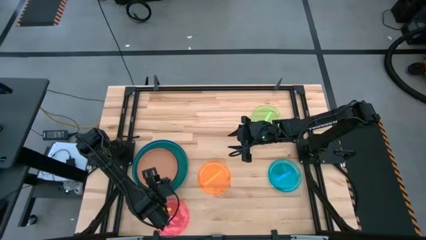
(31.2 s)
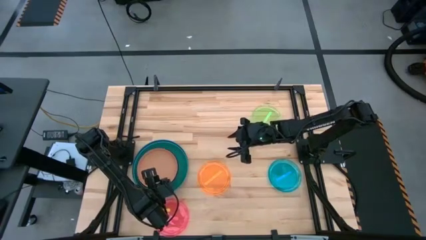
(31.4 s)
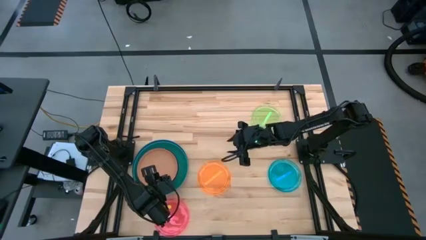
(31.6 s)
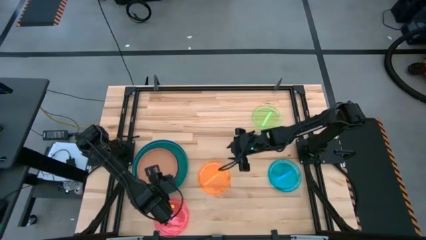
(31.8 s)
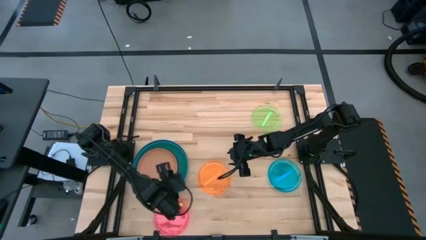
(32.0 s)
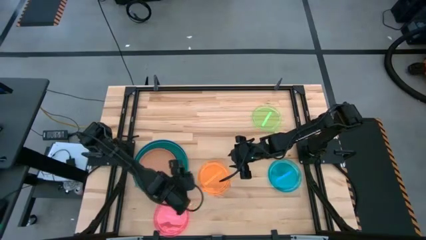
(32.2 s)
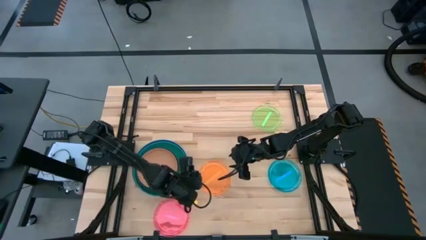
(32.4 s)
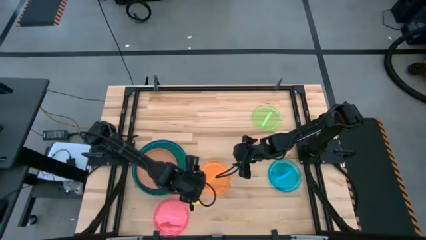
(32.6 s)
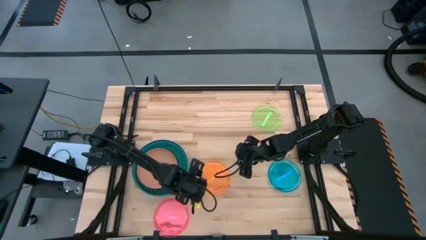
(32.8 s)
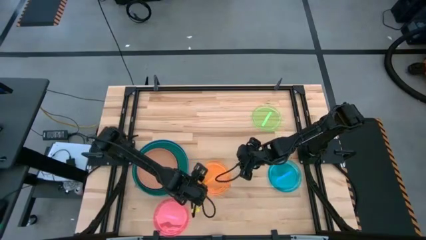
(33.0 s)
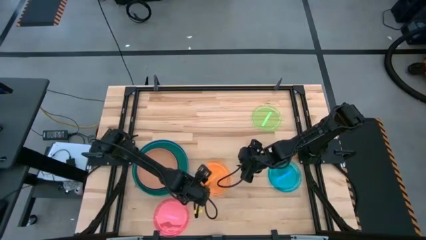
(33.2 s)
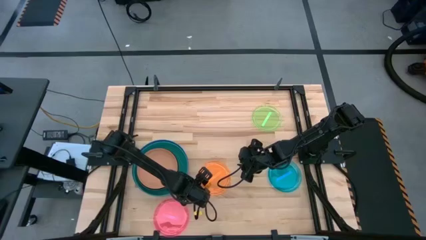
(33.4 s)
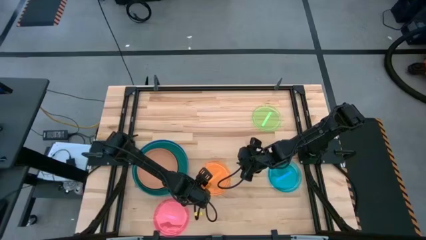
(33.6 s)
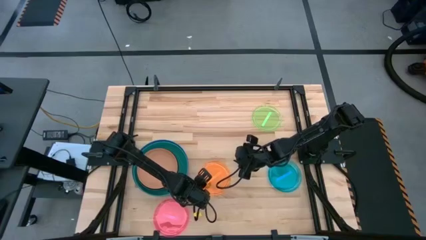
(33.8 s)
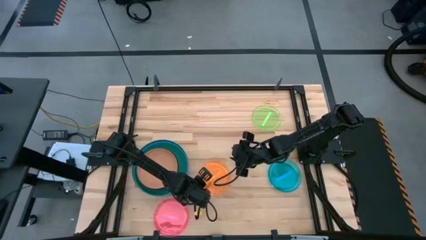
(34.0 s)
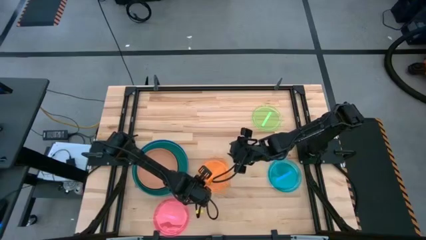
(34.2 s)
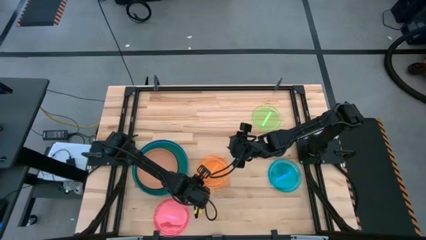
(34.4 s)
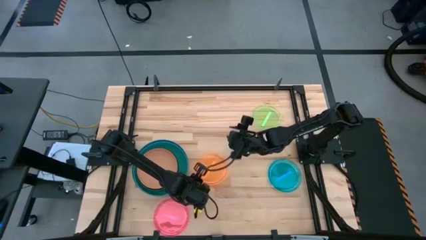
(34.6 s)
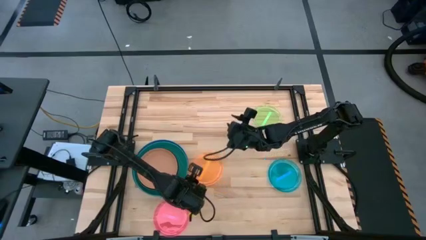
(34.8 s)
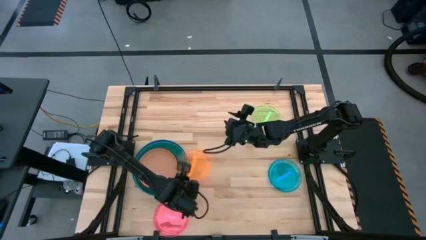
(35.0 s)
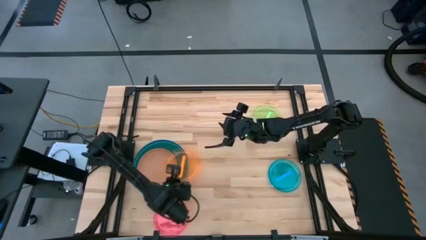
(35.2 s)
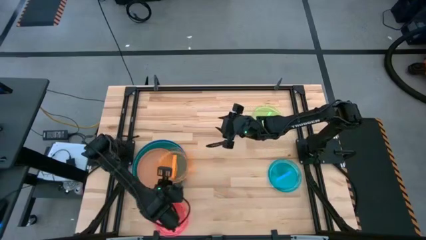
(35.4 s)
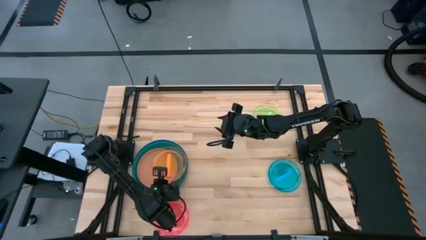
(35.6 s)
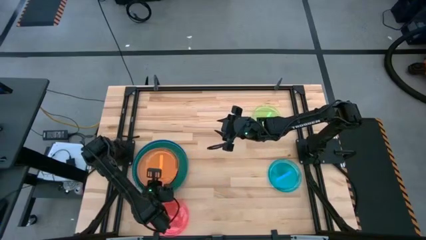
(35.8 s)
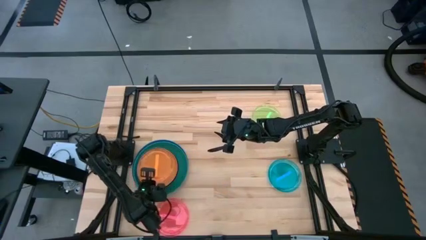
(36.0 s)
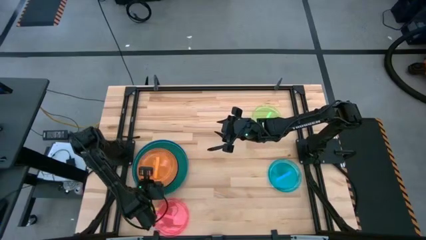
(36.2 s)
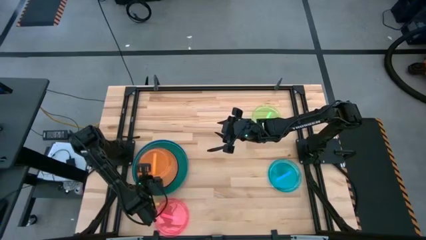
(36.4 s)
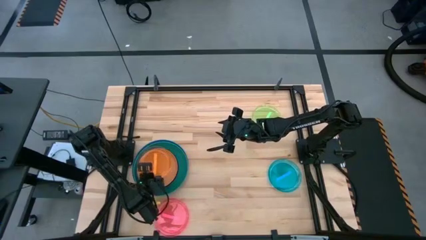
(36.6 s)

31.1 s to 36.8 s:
Task: Stack plastic plates
Stack the orange plate on top of the brown plate

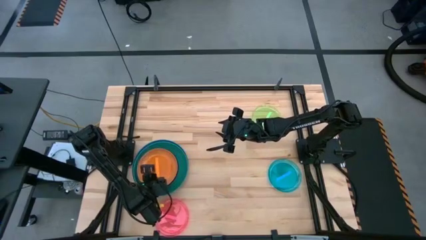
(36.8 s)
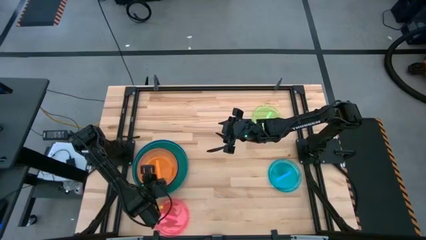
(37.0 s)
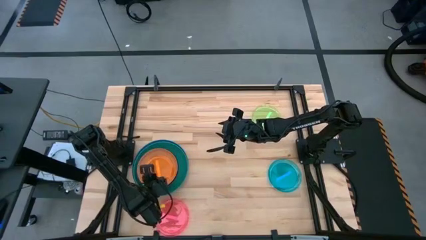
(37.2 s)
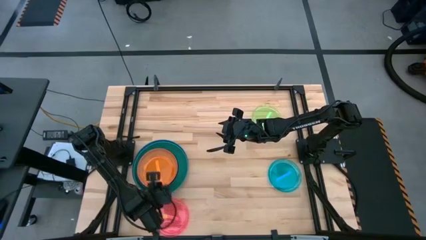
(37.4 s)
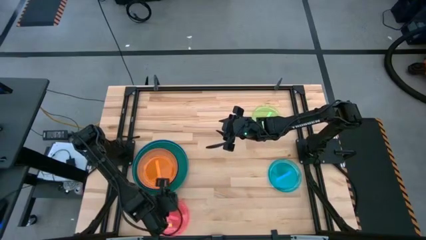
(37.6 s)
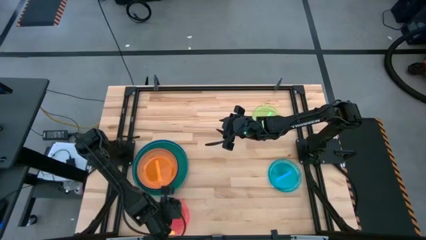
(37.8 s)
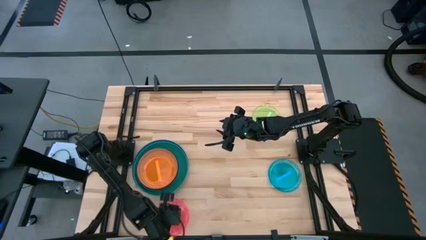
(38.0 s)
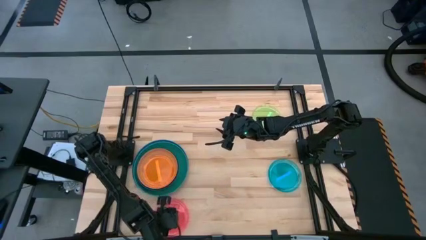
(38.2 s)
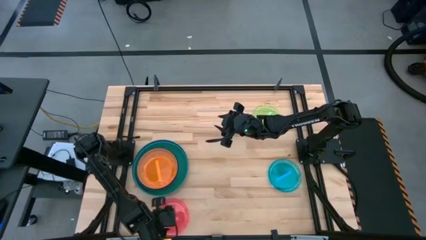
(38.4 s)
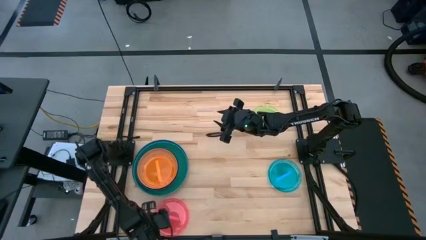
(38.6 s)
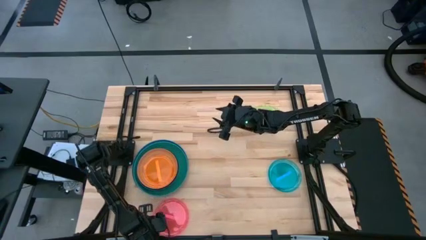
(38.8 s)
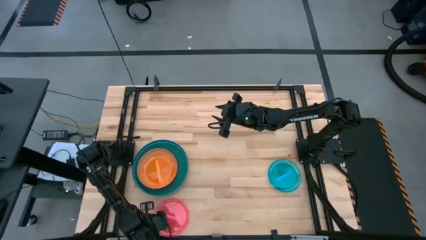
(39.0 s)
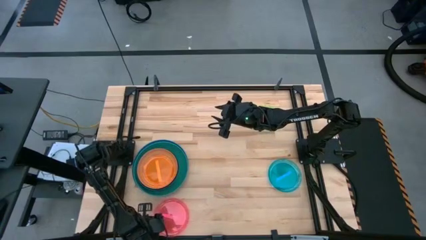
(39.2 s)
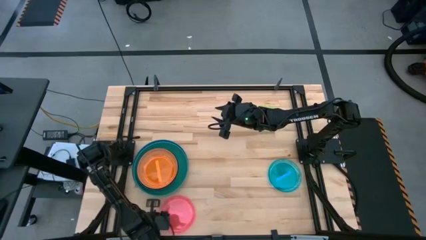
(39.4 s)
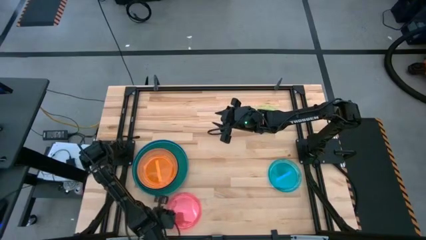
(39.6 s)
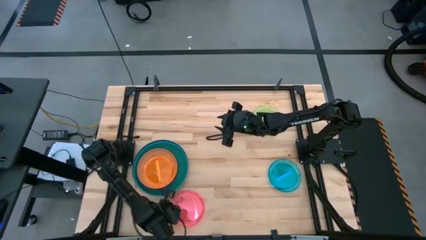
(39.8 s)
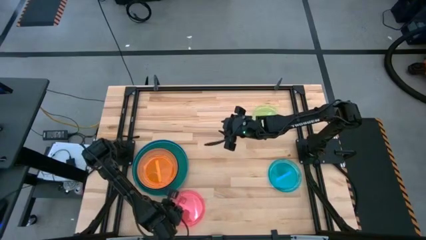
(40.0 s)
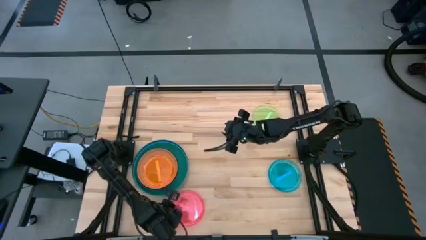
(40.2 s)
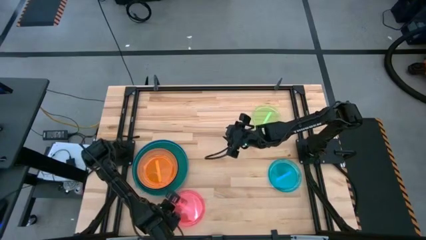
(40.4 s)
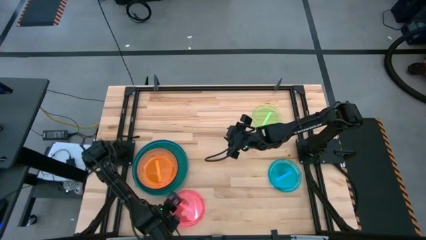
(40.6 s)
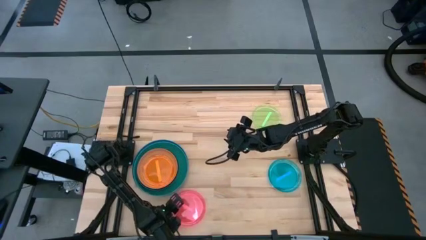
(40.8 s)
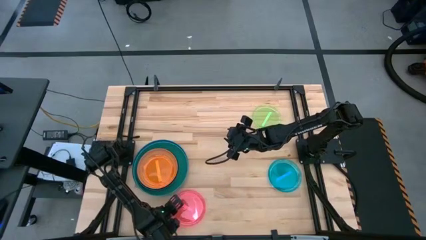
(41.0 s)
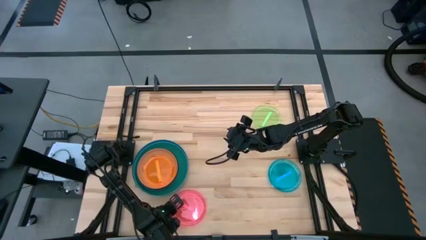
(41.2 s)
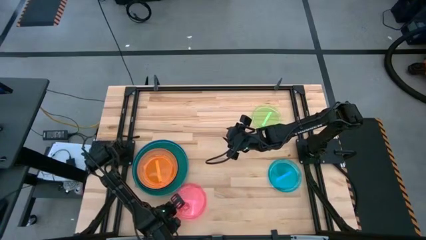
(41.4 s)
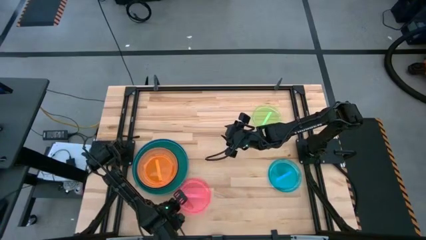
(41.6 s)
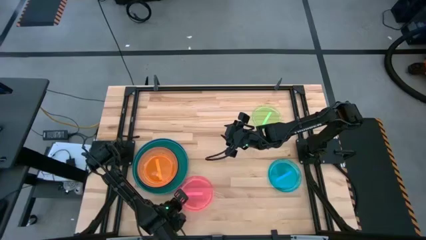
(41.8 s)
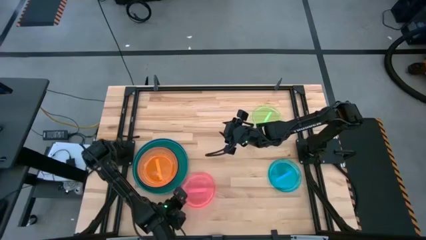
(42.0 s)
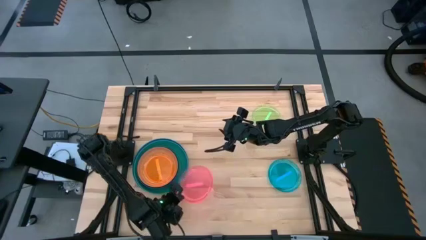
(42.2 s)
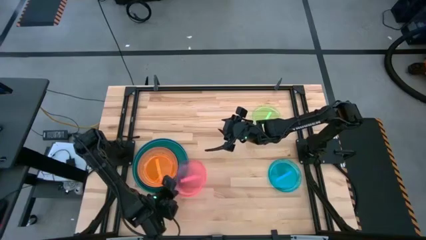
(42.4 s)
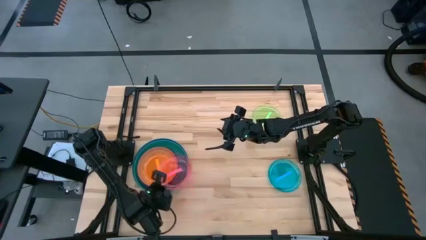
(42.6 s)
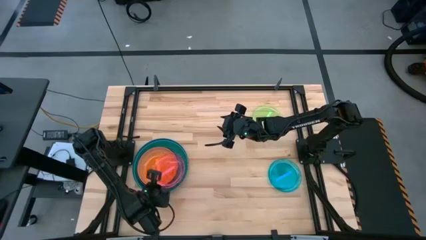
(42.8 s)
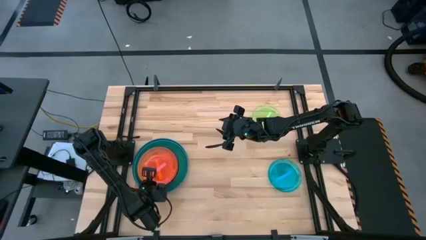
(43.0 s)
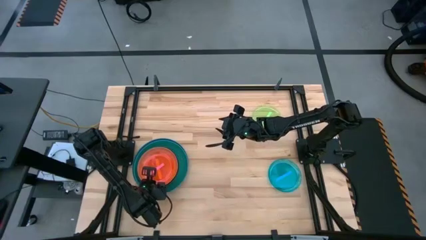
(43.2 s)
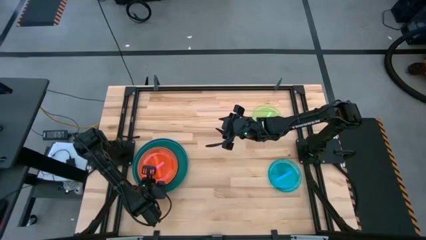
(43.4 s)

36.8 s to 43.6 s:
Stack the pink plate on top of the orange plate

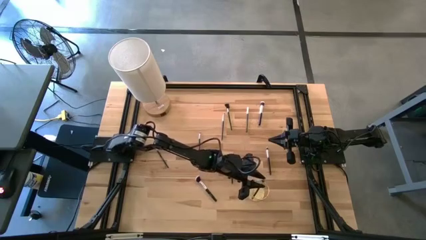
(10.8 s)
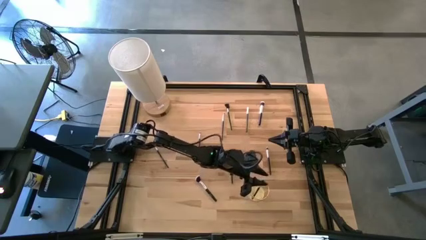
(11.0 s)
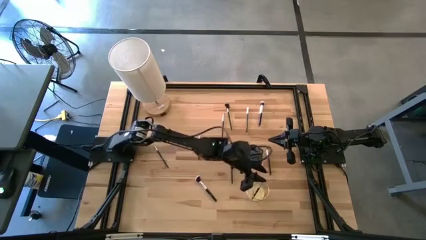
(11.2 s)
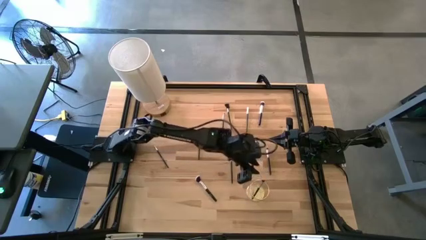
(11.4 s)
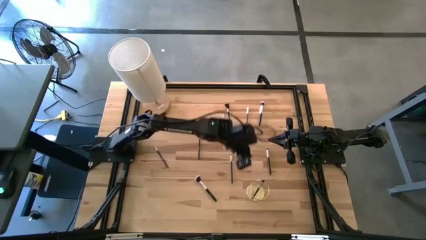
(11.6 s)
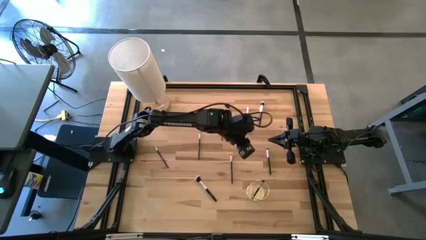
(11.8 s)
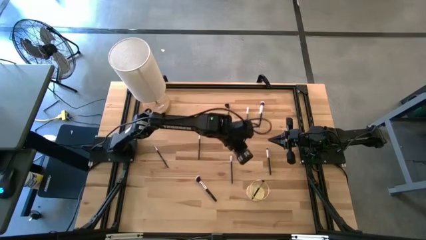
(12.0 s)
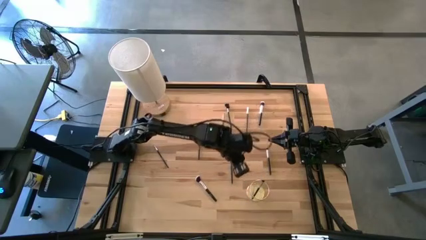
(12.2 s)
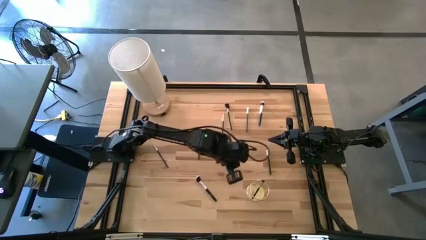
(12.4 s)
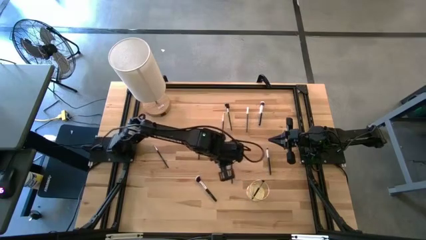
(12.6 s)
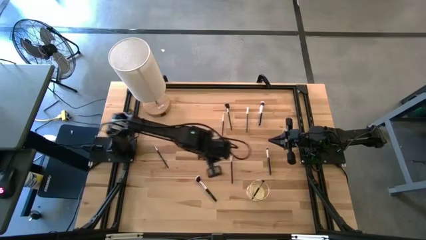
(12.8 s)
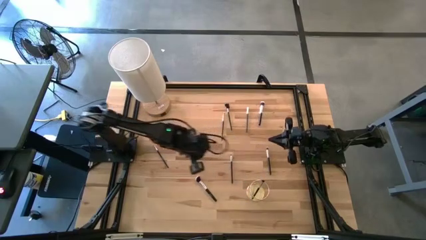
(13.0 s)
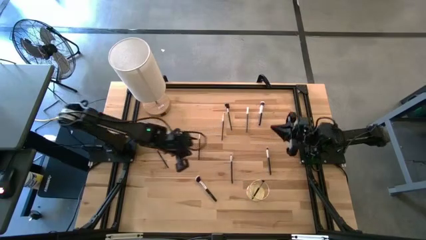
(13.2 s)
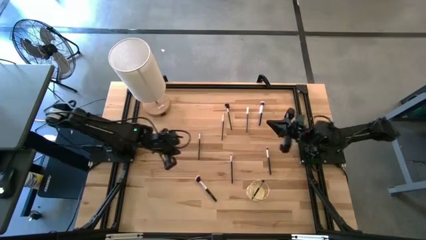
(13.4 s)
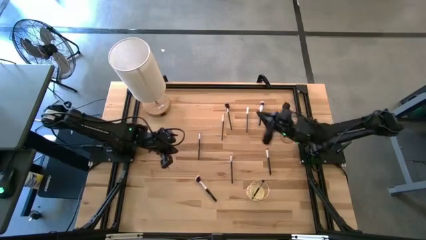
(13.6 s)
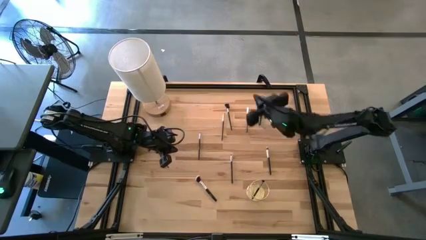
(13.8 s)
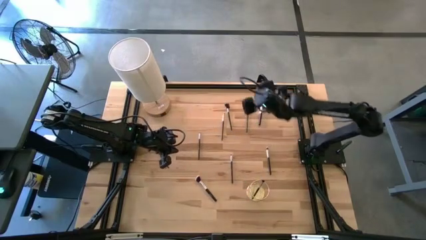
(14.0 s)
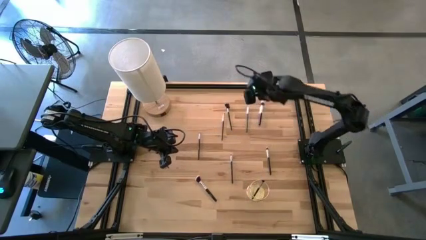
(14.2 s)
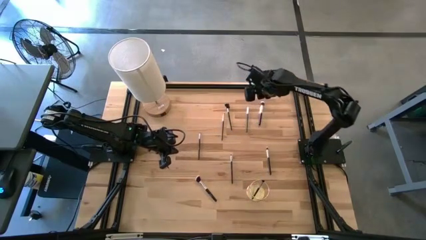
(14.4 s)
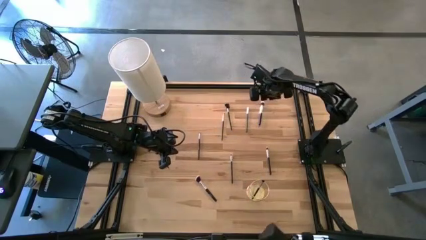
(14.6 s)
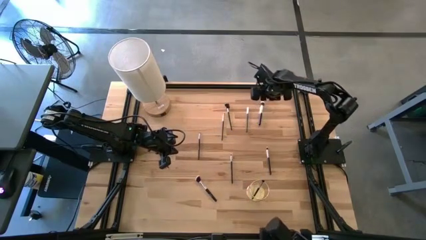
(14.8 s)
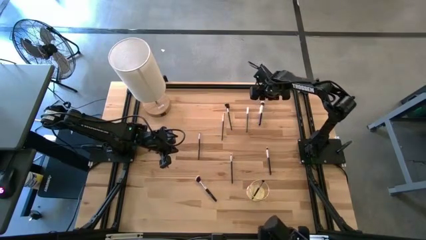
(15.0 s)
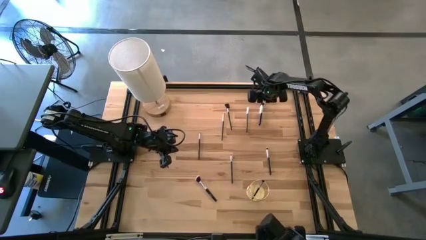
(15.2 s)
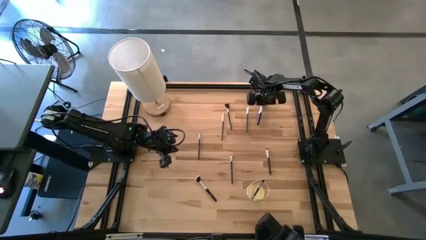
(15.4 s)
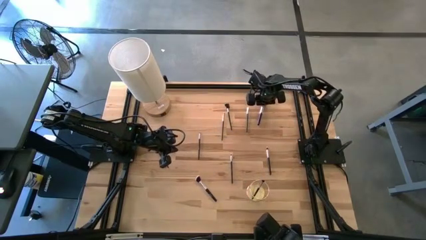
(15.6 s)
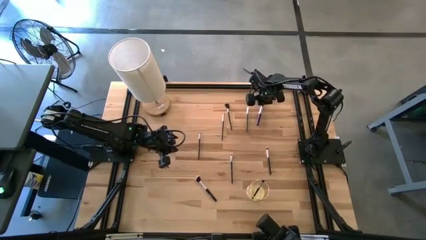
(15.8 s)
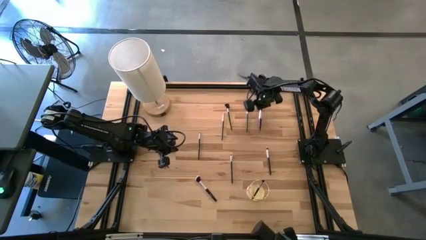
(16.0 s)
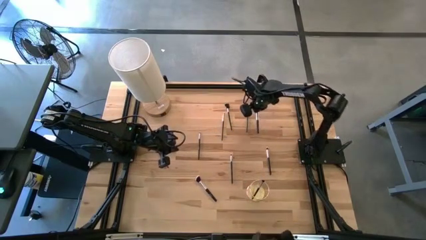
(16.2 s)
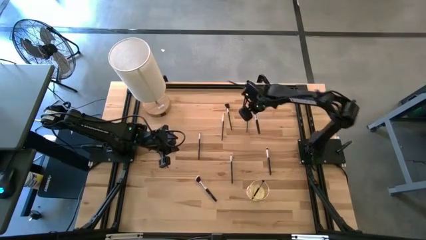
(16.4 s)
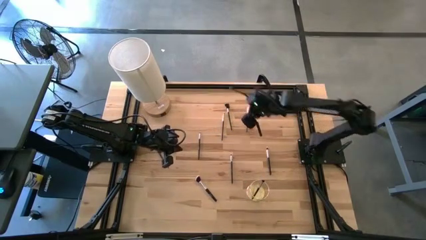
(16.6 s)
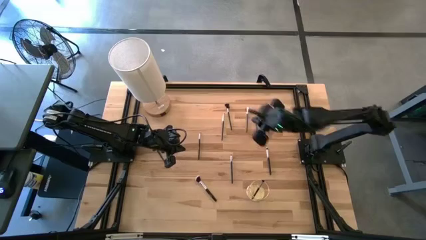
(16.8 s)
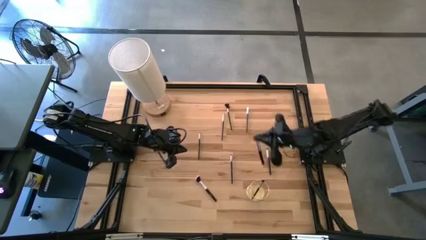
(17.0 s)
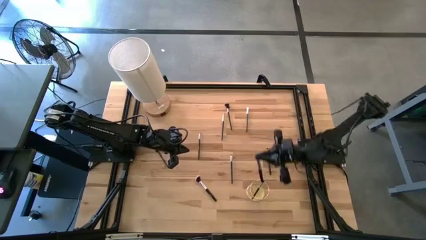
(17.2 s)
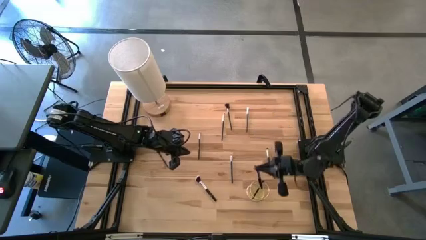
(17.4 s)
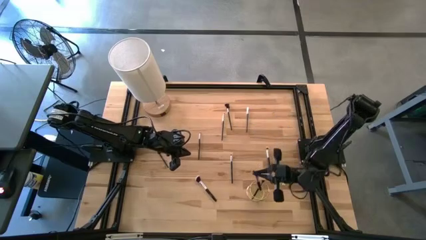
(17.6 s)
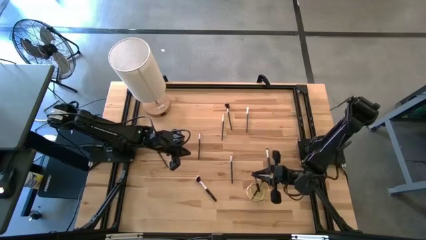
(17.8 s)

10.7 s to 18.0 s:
Task: Pick & Place Makeup Brushes
Put the blush brush into the makeup holder
